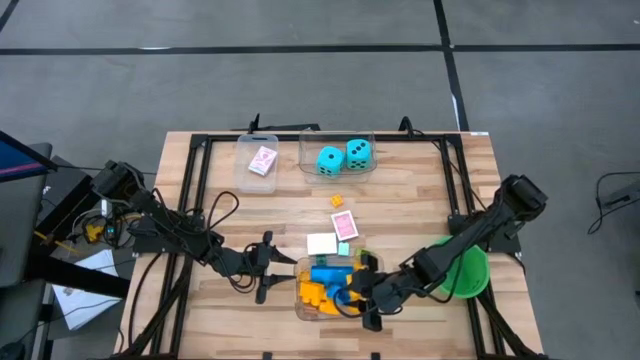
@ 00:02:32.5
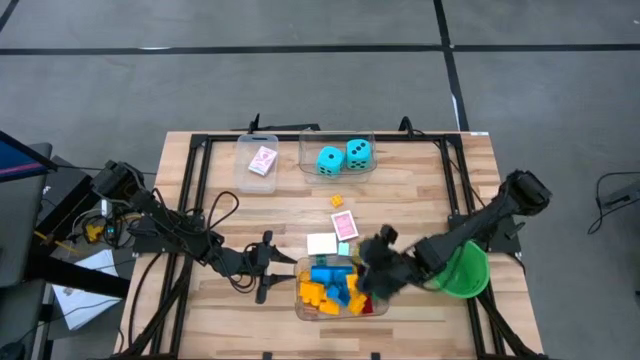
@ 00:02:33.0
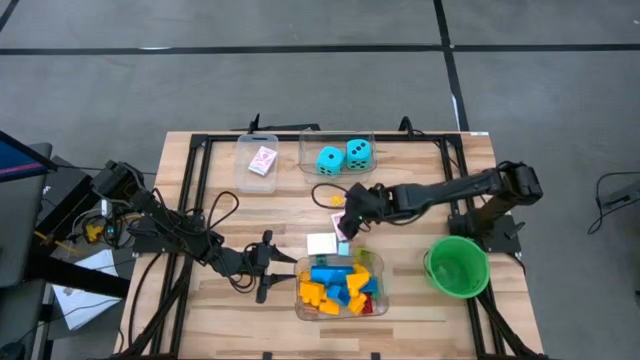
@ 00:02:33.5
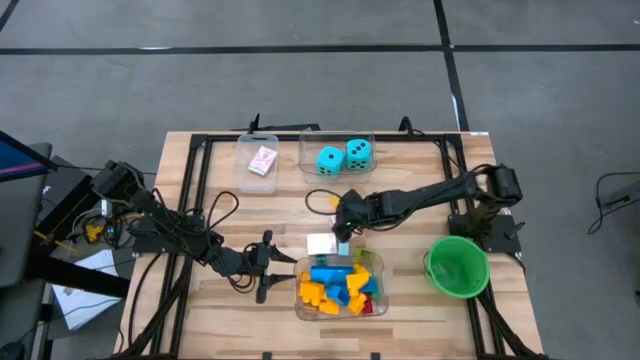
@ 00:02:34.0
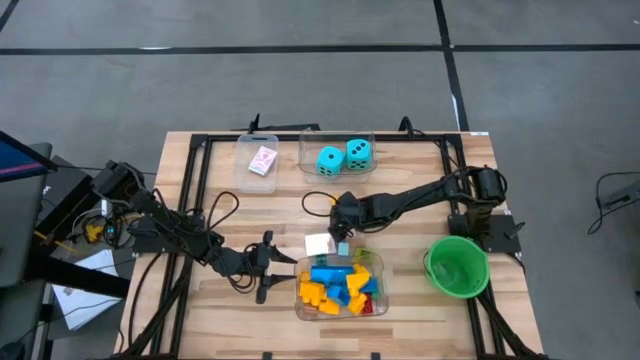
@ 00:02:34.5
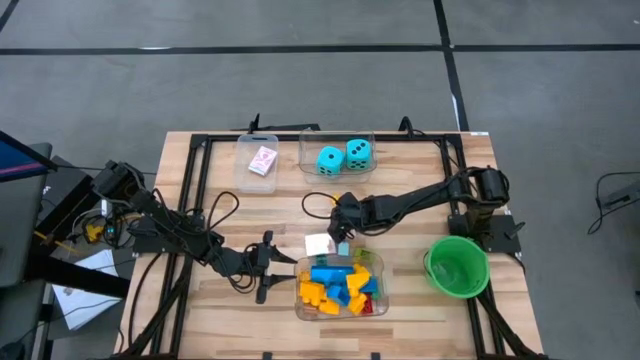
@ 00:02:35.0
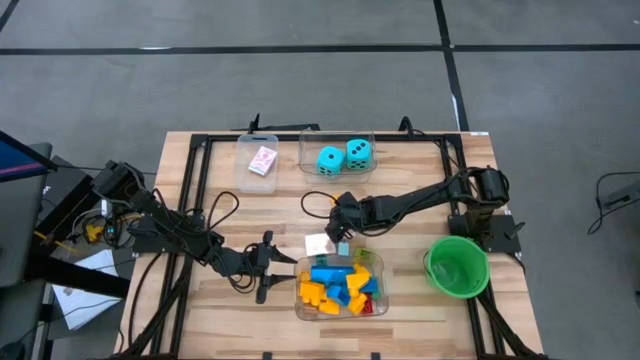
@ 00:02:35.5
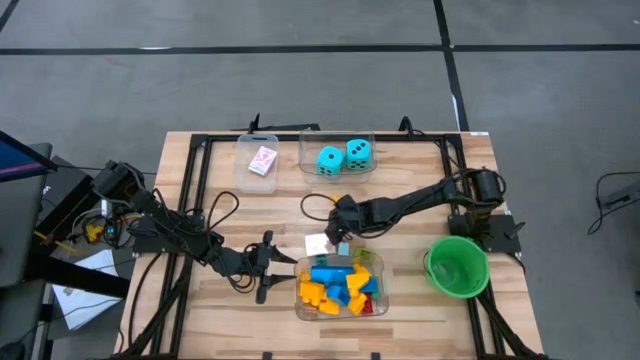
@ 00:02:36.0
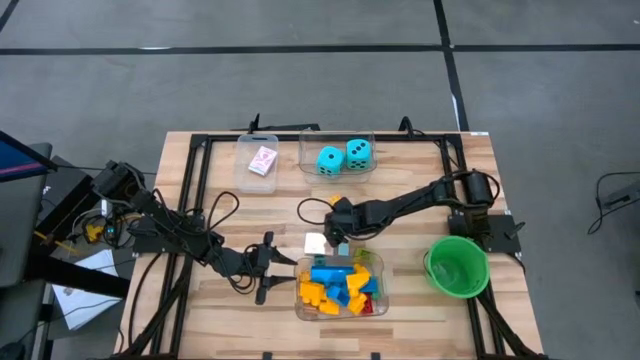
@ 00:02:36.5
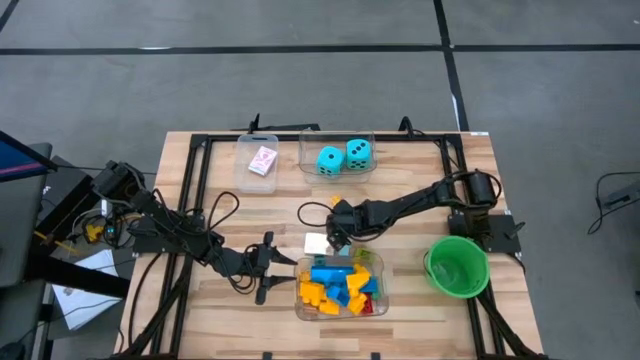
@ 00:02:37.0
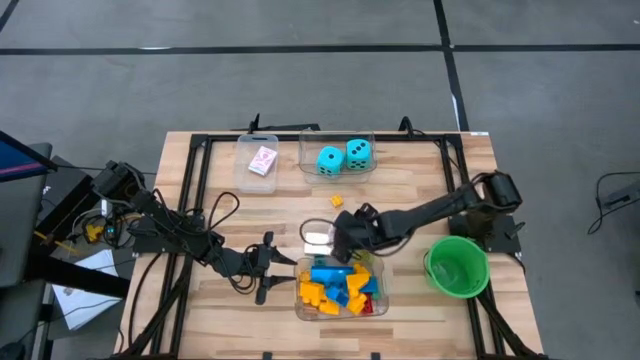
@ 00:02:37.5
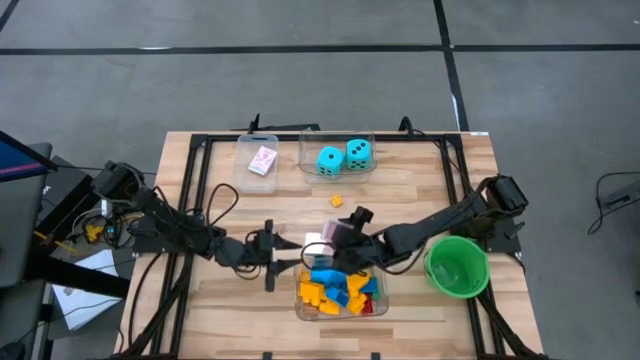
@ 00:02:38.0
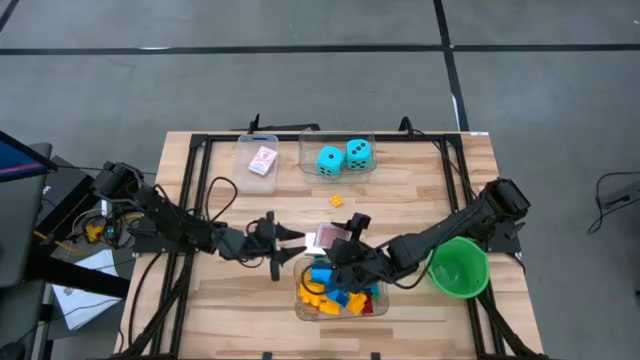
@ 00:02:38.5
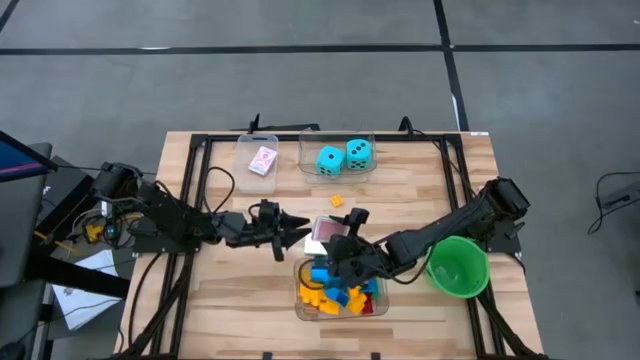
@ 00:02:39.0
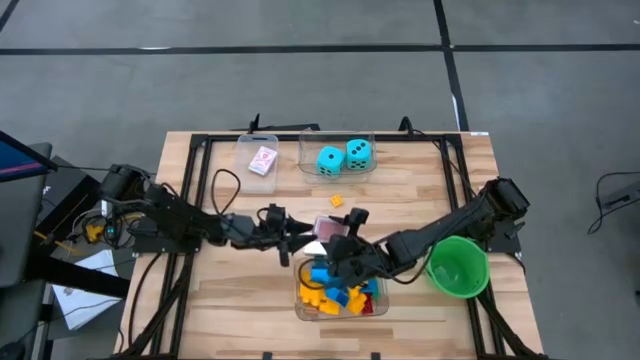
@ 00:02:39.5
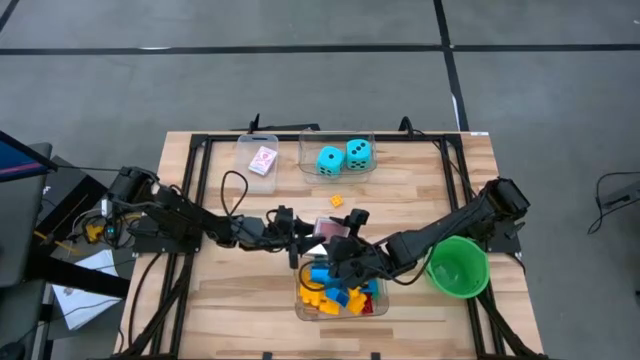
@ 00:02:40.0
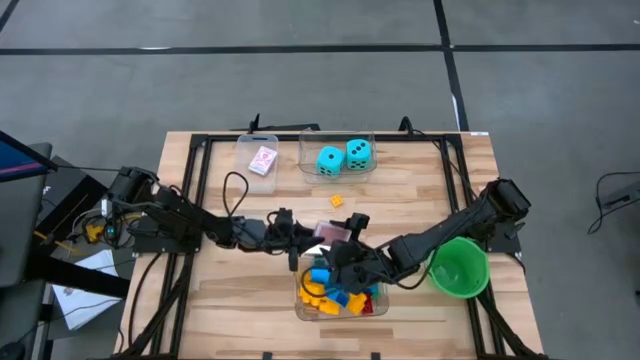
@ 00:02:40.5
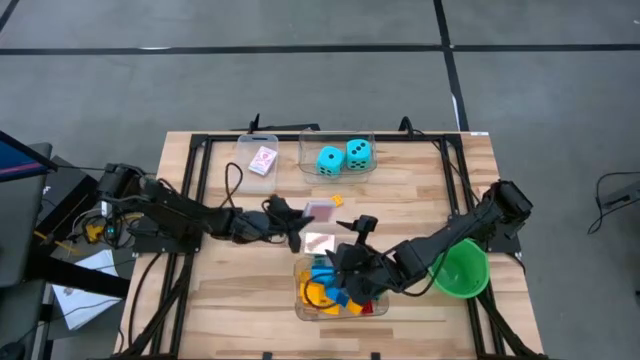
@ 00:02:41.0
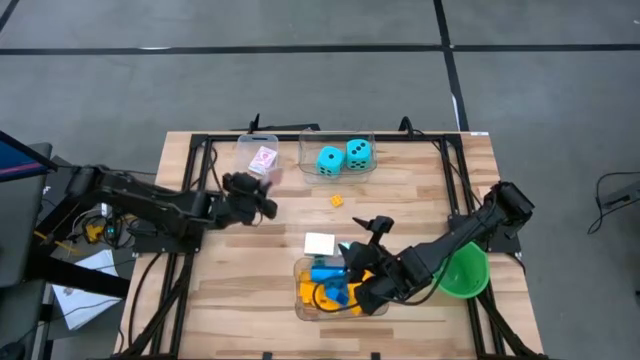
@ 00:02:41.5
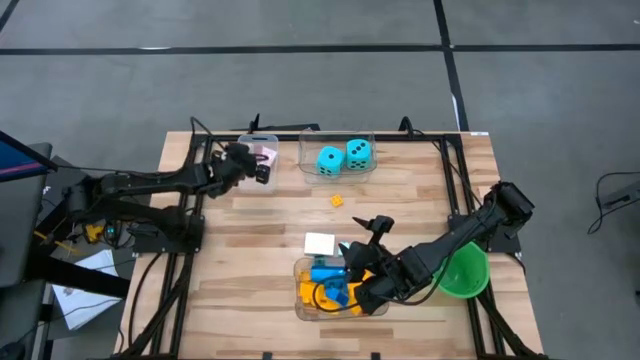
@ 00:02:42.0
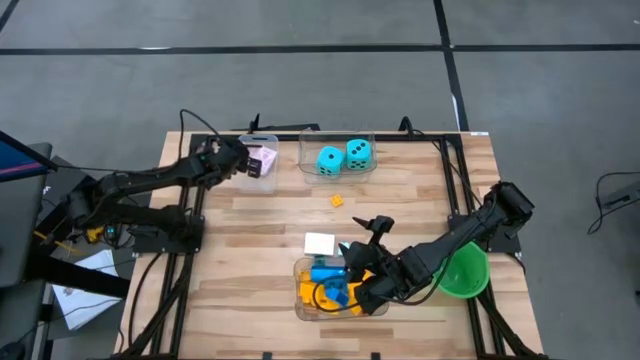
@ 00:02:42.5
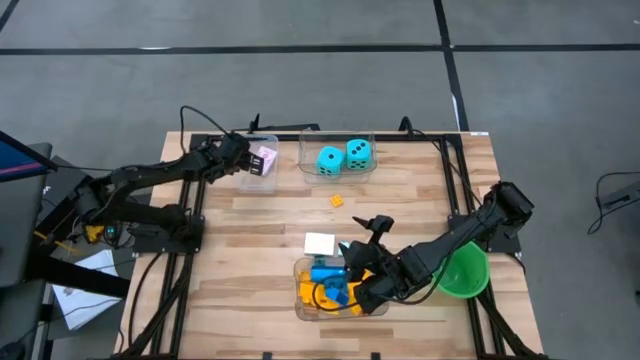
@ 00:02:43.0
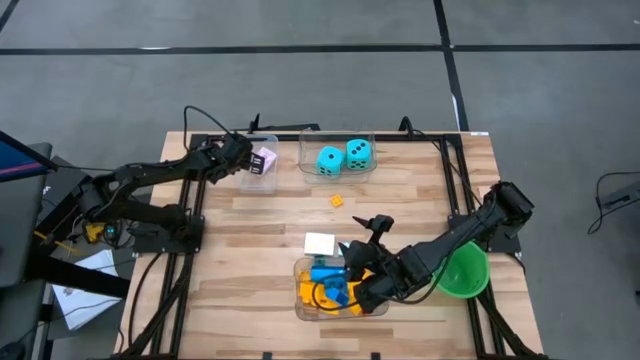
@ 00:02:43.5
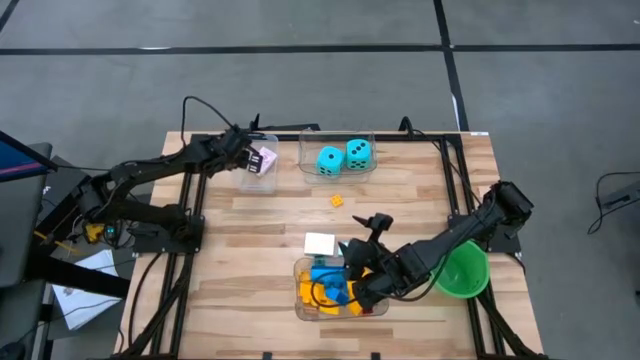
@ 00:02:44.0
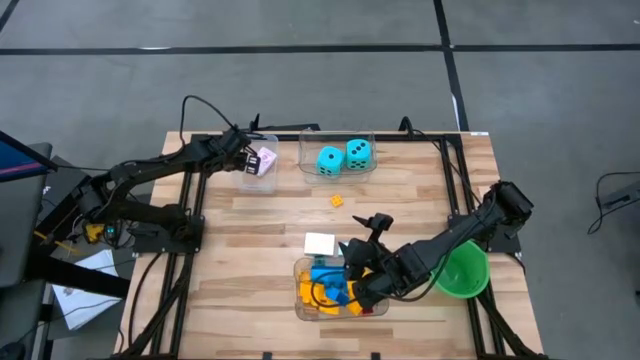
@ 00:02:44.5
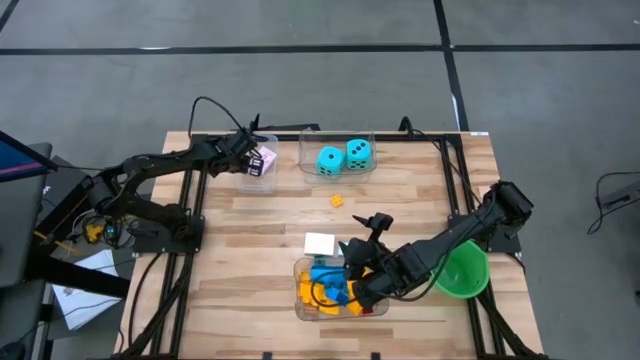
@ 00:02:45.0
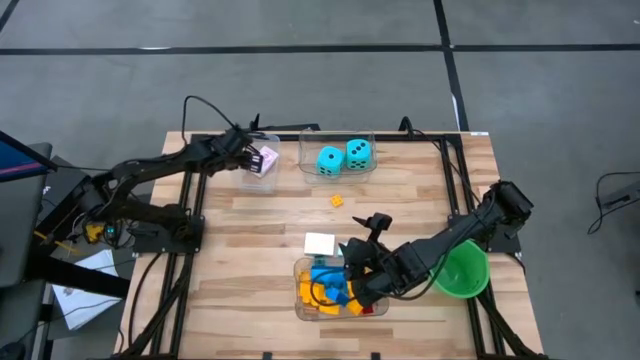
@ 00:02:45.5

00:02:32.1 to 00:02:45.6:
Task: Pick & Place Toys
Put the red deck of cards box into the white bin

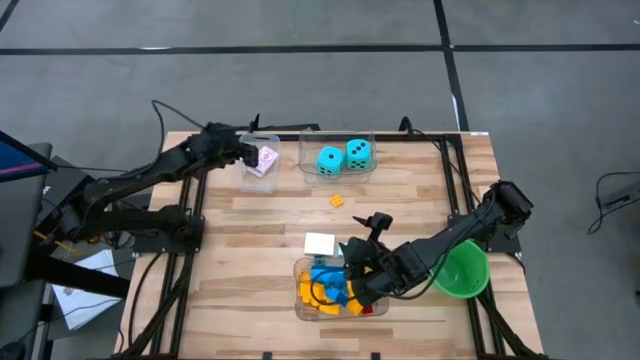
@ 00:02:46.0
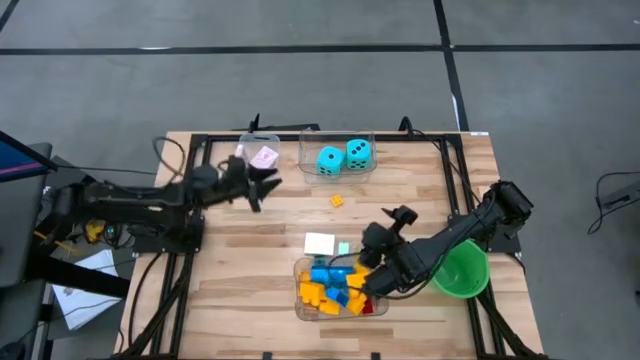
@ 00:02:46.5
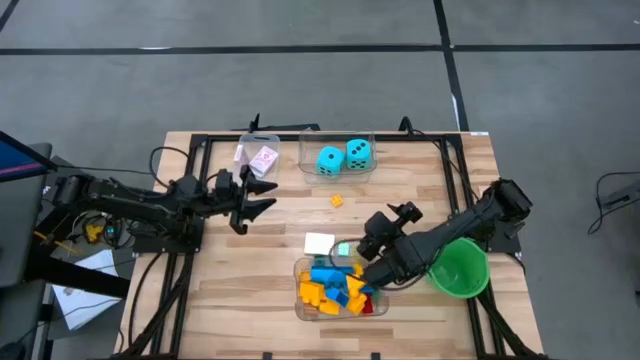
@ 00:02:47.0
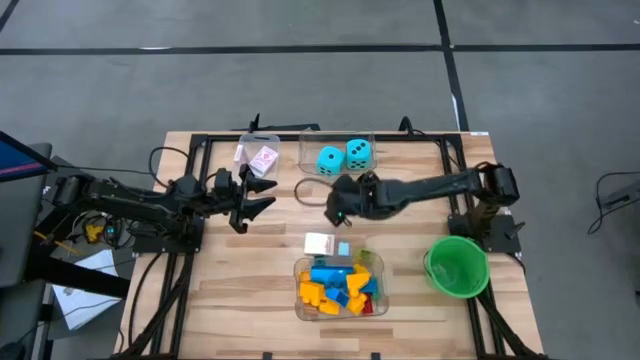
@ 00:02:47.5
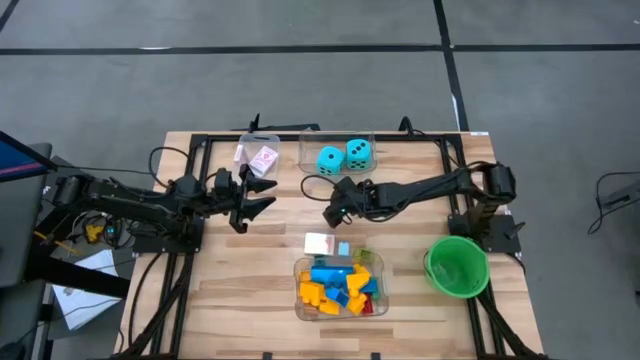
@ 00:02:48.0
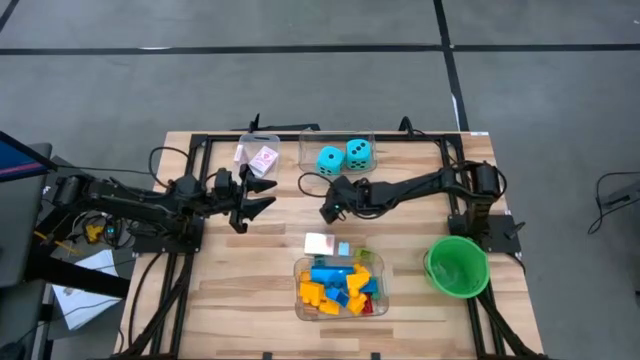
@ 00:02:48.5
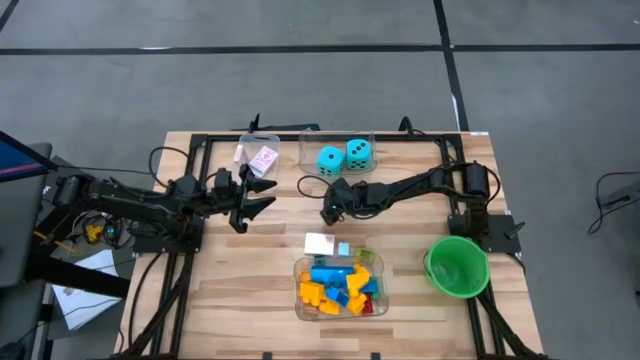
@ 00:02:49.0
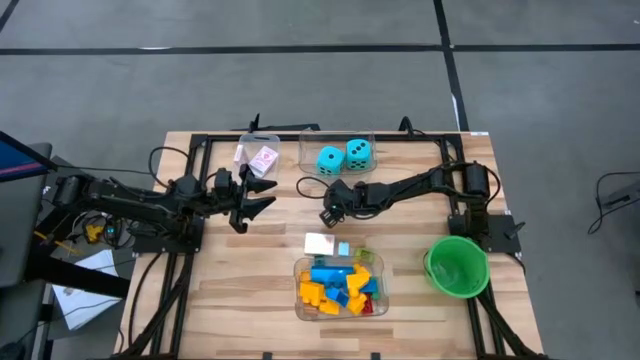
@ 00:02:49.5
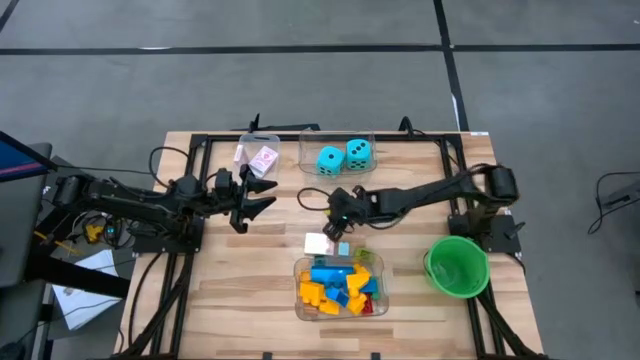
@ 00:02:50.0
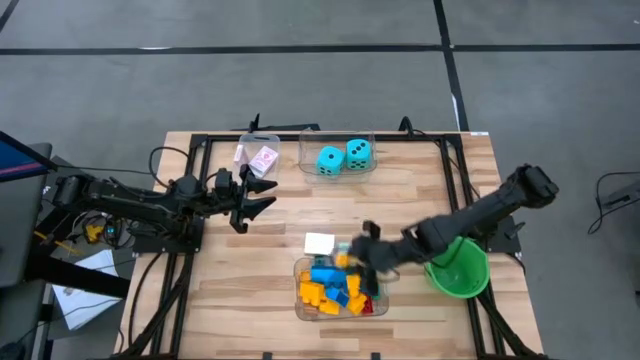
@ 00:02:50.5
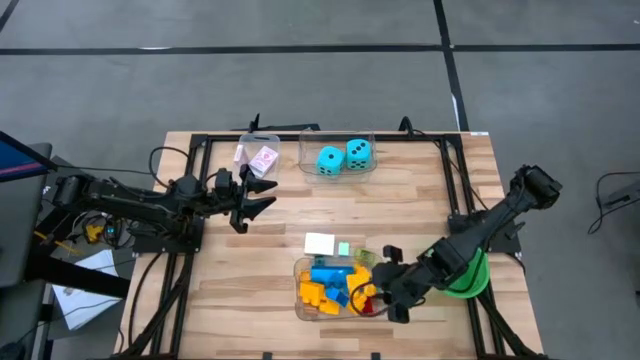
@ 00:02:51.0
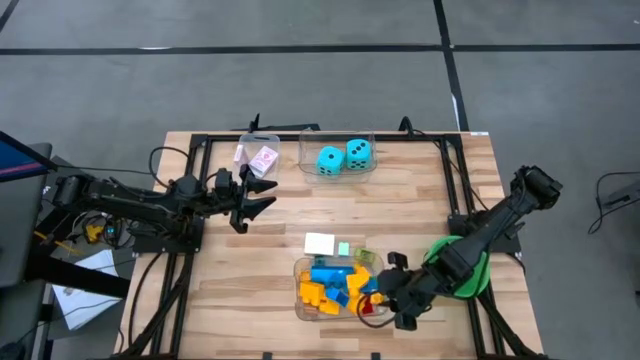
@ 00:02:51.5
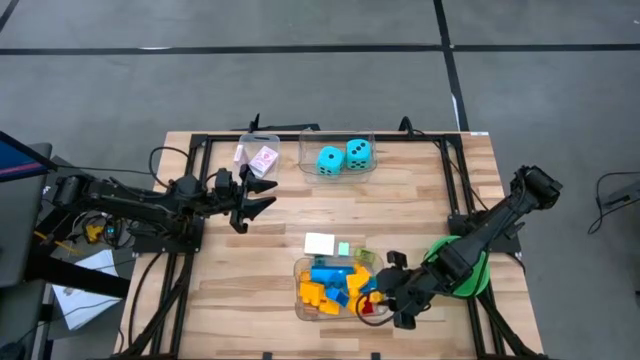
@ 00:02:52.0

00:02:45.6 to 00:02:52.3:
Put the yellow game piece into the bottom transparent bin
